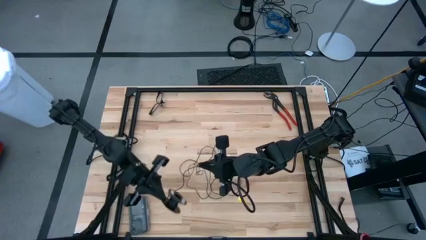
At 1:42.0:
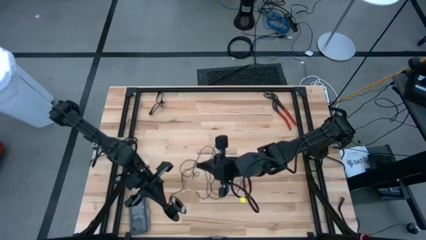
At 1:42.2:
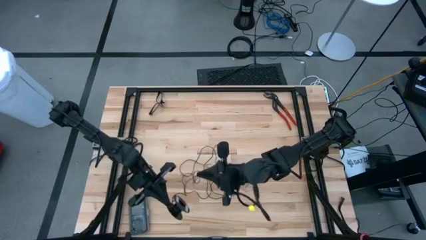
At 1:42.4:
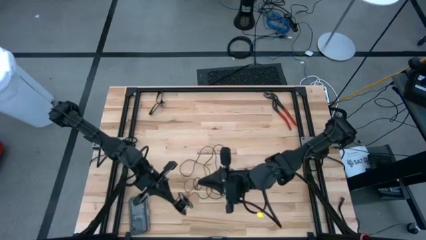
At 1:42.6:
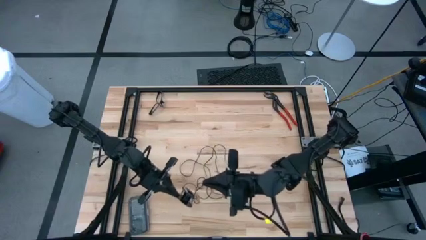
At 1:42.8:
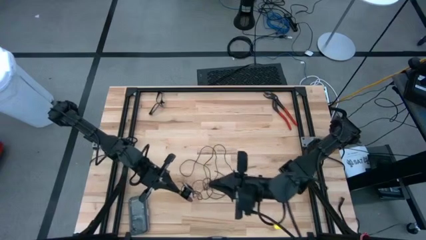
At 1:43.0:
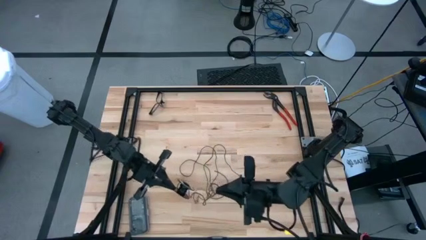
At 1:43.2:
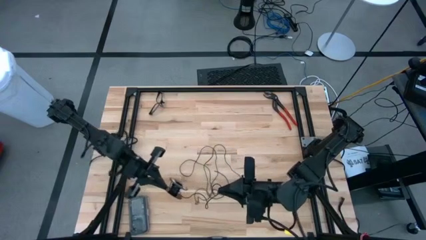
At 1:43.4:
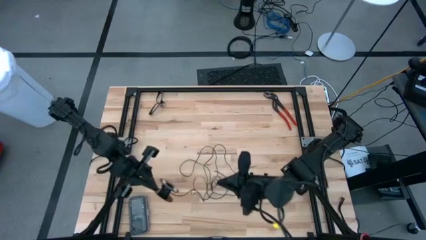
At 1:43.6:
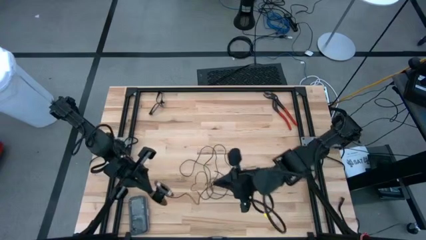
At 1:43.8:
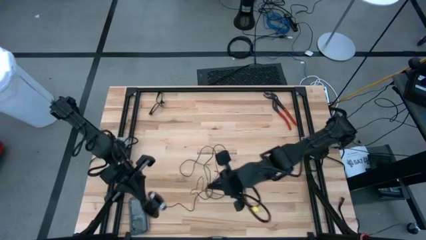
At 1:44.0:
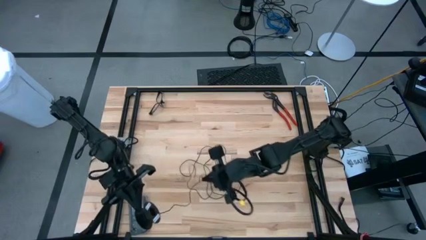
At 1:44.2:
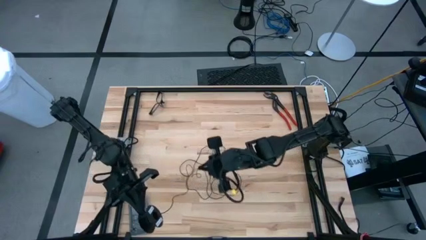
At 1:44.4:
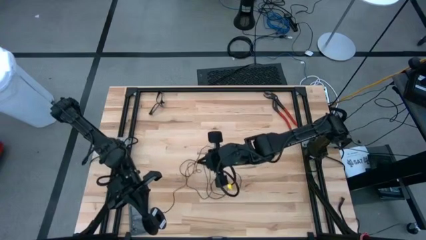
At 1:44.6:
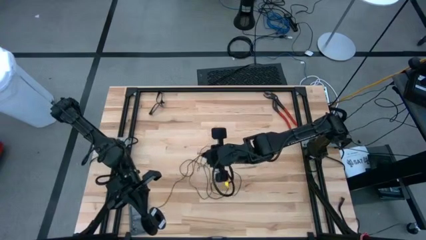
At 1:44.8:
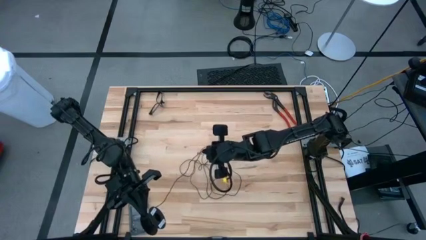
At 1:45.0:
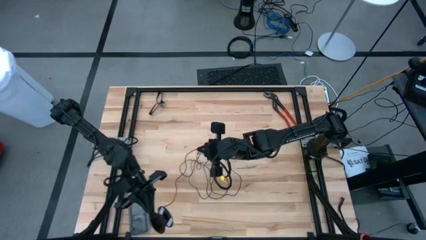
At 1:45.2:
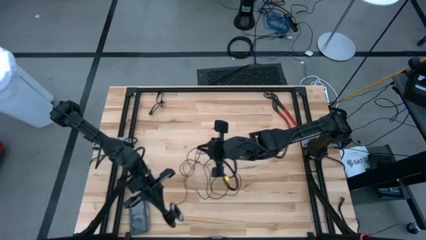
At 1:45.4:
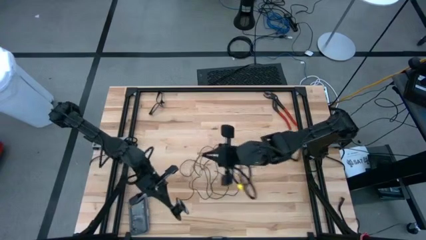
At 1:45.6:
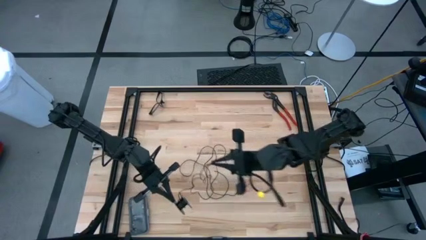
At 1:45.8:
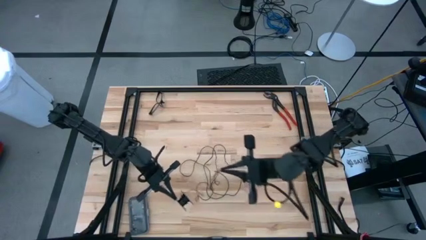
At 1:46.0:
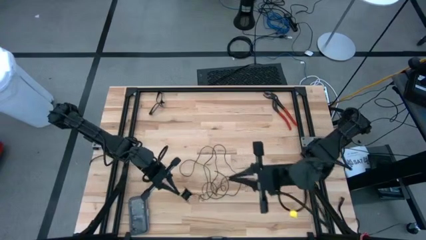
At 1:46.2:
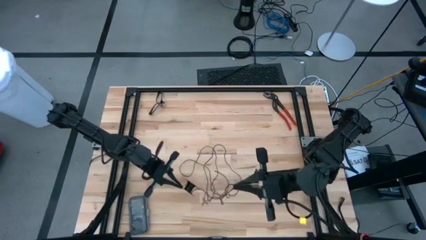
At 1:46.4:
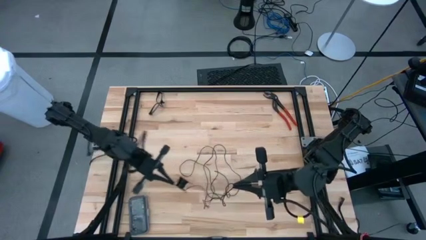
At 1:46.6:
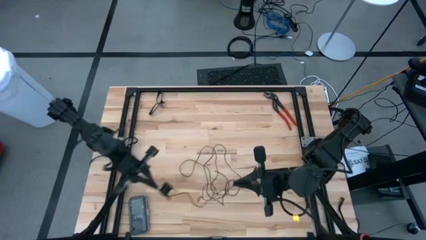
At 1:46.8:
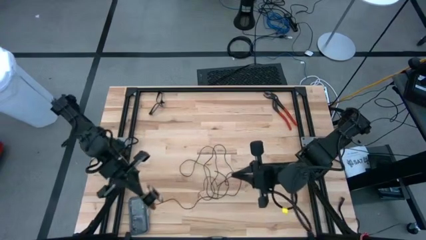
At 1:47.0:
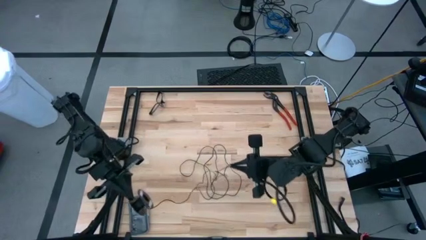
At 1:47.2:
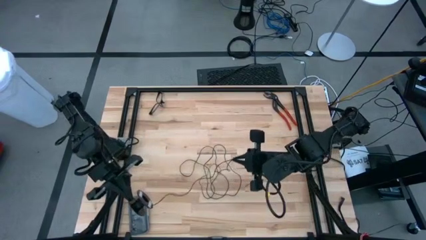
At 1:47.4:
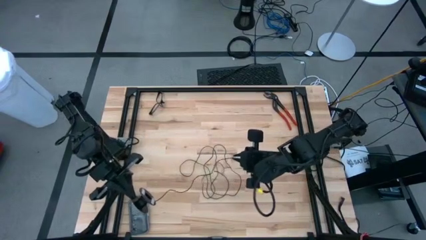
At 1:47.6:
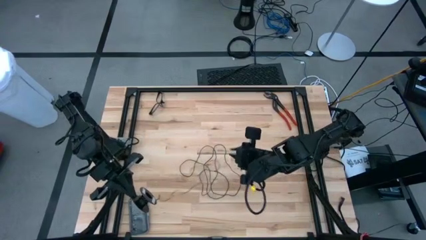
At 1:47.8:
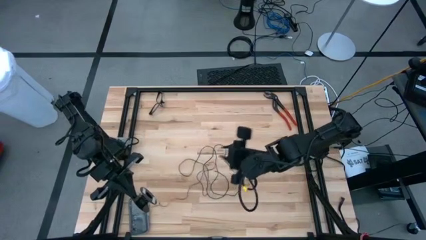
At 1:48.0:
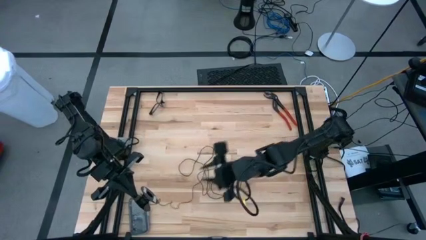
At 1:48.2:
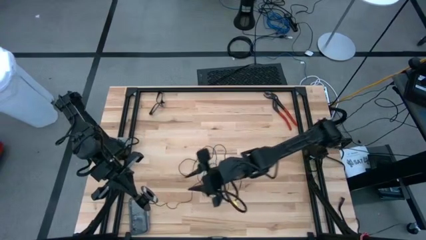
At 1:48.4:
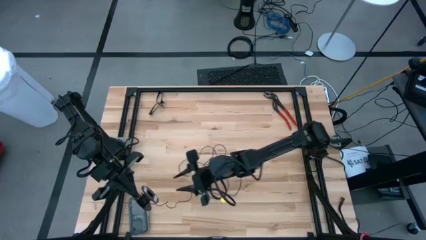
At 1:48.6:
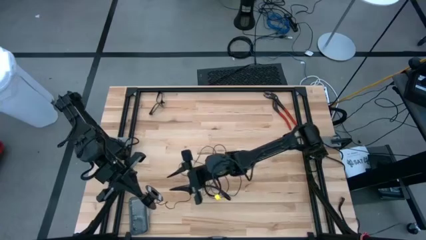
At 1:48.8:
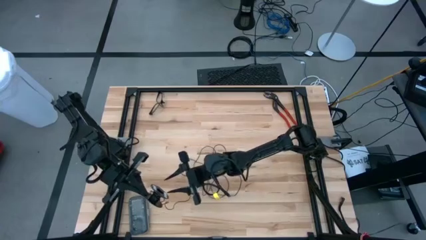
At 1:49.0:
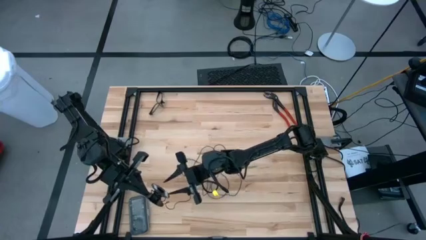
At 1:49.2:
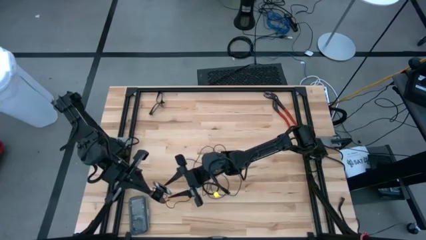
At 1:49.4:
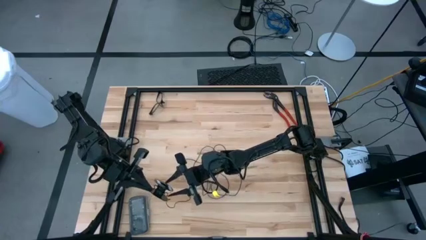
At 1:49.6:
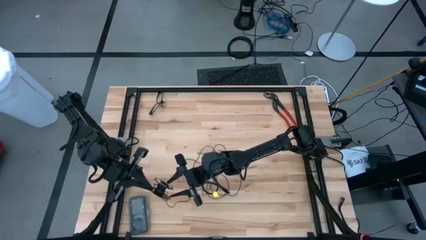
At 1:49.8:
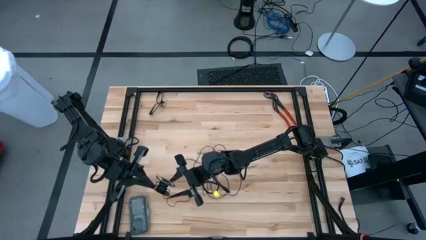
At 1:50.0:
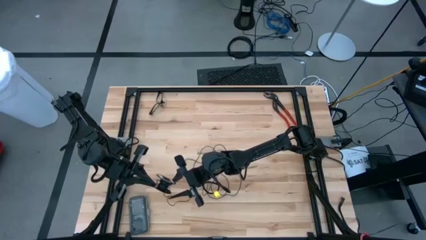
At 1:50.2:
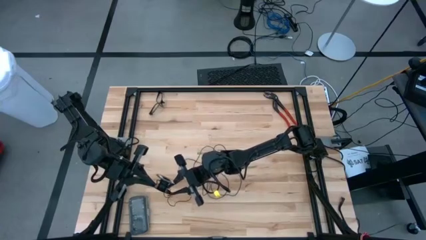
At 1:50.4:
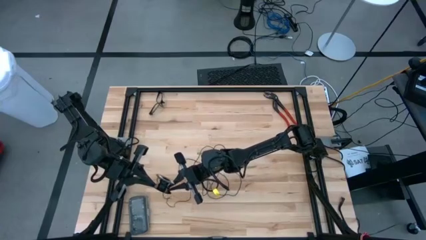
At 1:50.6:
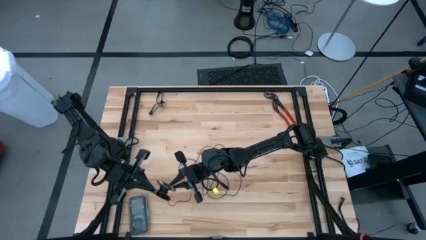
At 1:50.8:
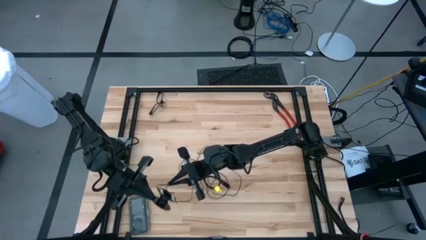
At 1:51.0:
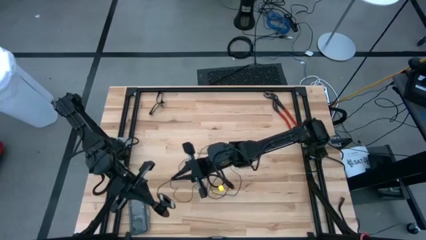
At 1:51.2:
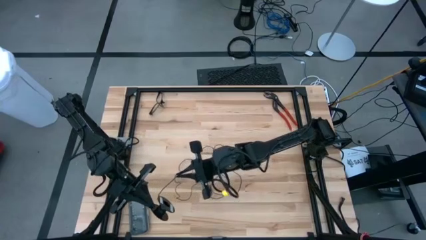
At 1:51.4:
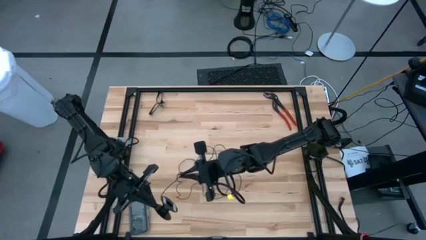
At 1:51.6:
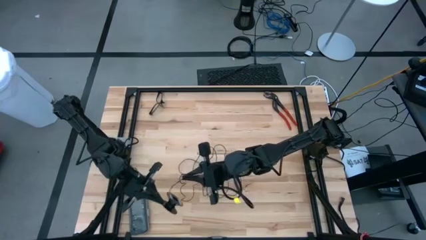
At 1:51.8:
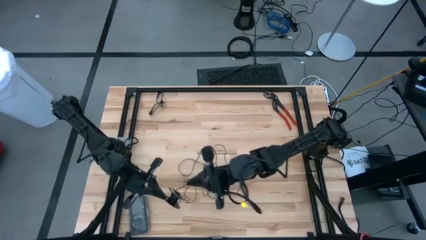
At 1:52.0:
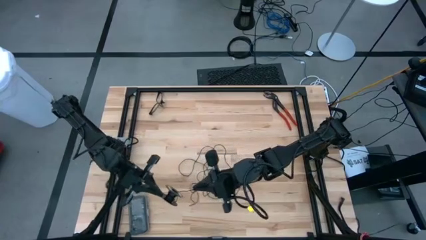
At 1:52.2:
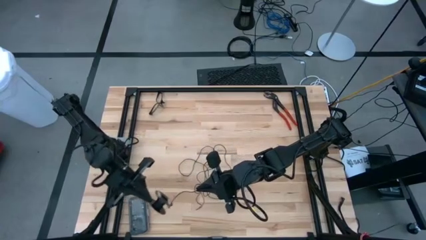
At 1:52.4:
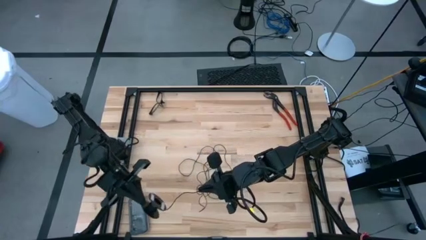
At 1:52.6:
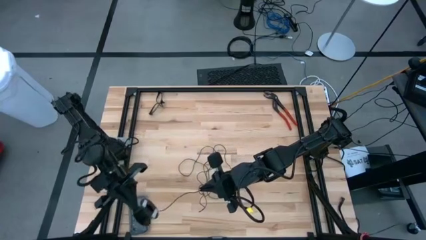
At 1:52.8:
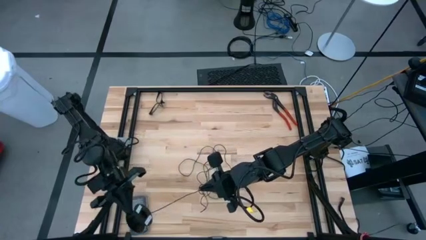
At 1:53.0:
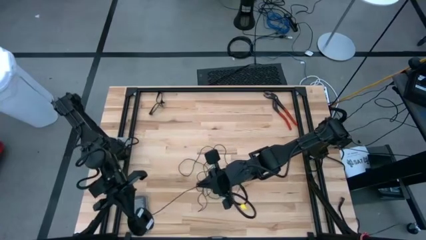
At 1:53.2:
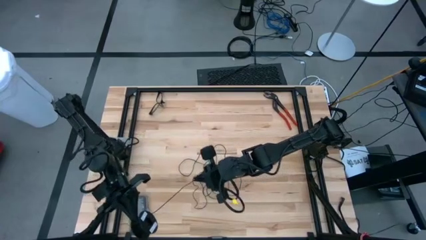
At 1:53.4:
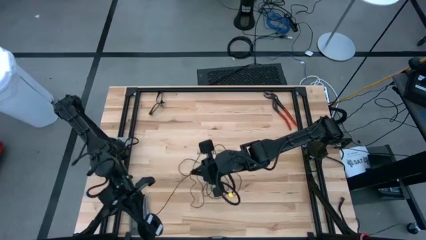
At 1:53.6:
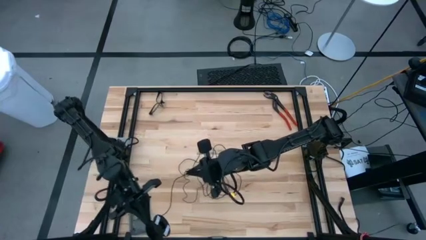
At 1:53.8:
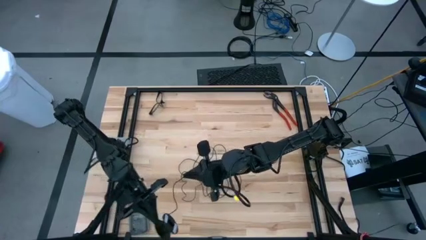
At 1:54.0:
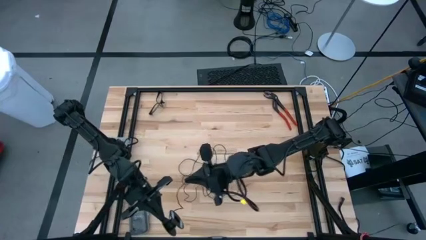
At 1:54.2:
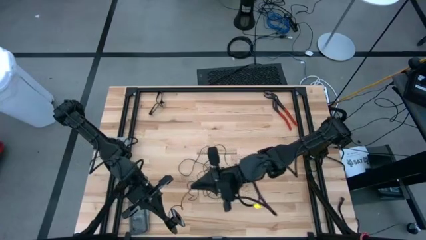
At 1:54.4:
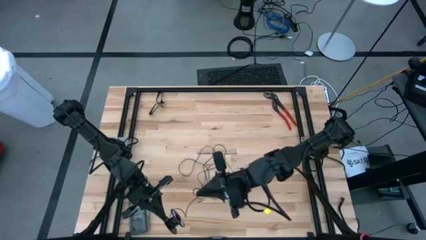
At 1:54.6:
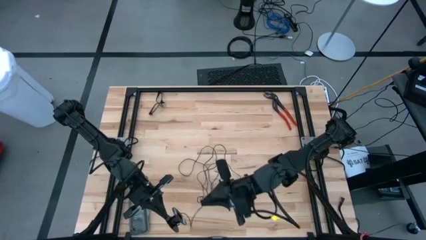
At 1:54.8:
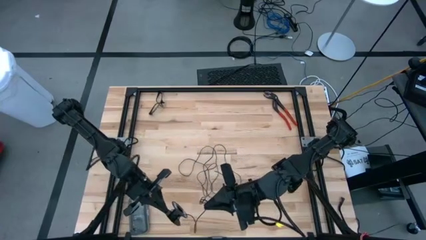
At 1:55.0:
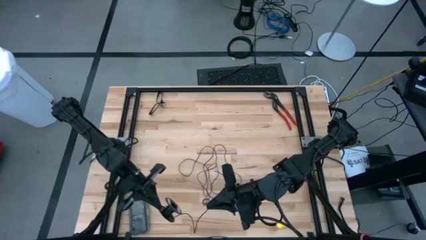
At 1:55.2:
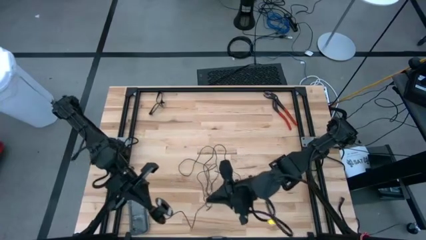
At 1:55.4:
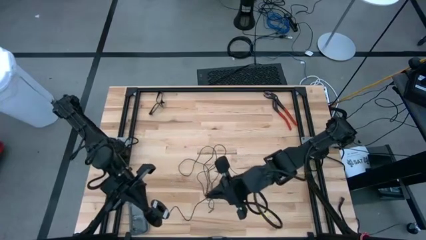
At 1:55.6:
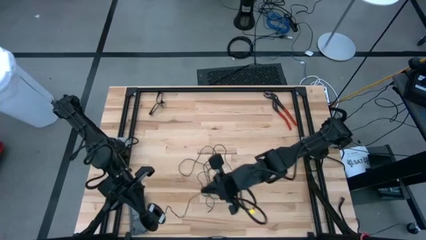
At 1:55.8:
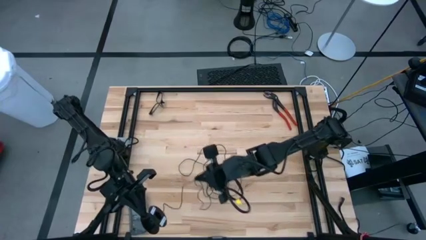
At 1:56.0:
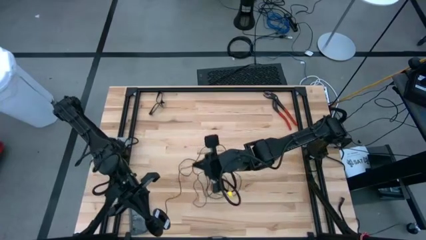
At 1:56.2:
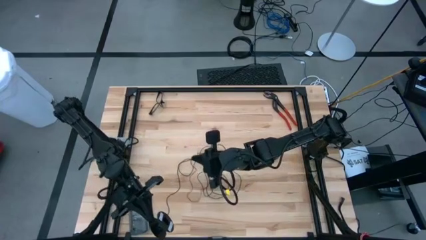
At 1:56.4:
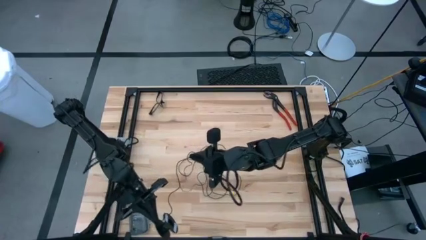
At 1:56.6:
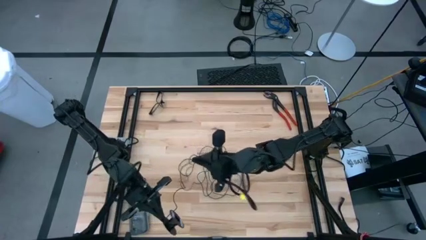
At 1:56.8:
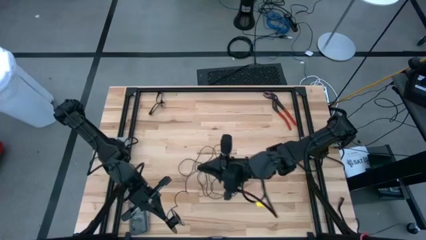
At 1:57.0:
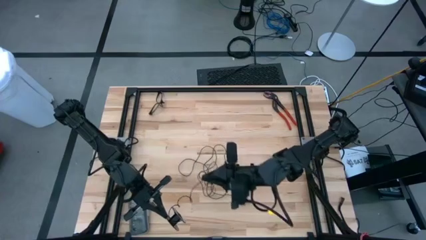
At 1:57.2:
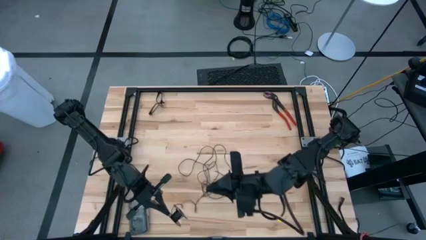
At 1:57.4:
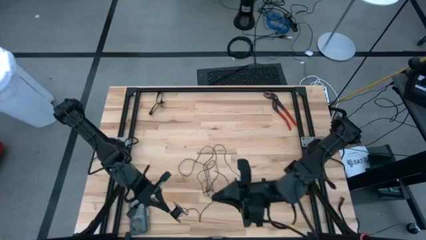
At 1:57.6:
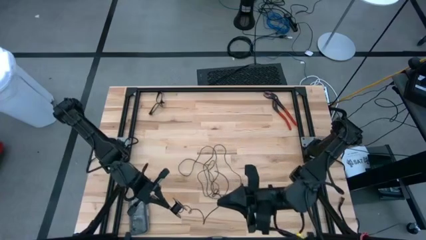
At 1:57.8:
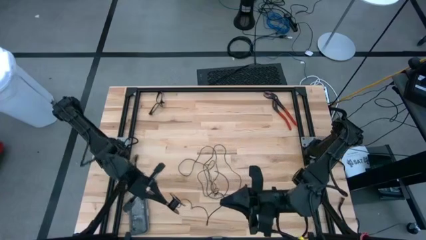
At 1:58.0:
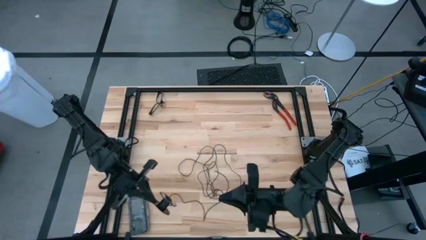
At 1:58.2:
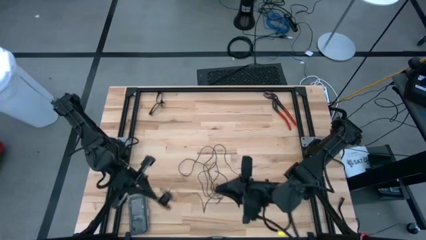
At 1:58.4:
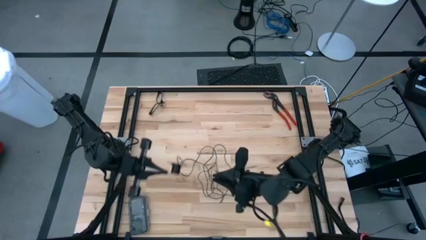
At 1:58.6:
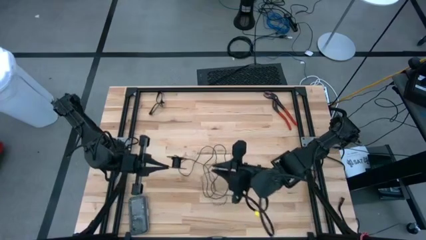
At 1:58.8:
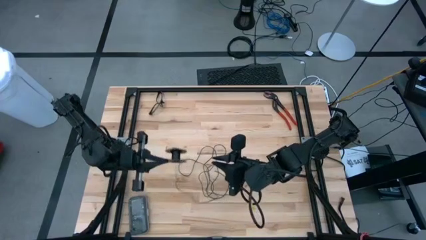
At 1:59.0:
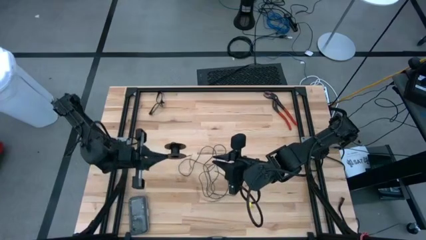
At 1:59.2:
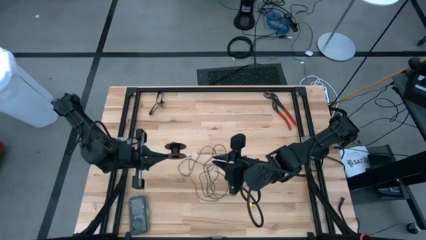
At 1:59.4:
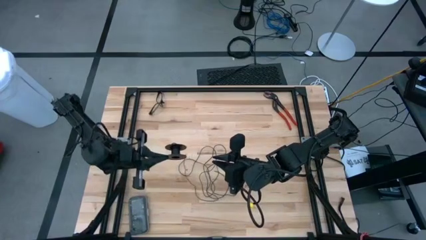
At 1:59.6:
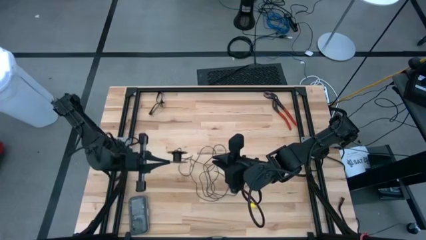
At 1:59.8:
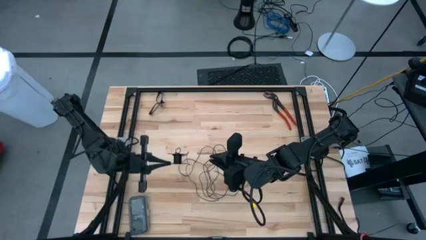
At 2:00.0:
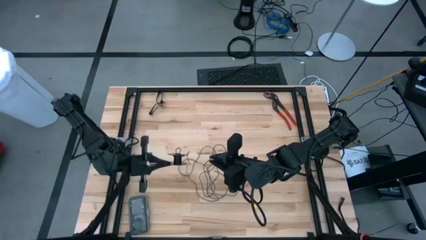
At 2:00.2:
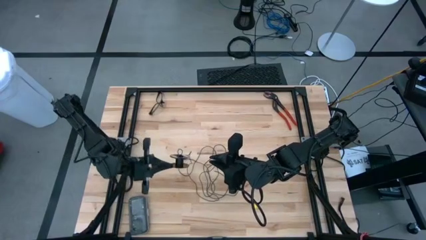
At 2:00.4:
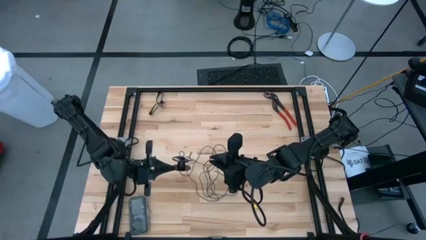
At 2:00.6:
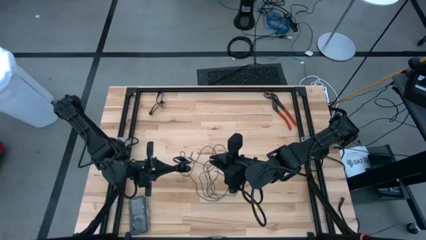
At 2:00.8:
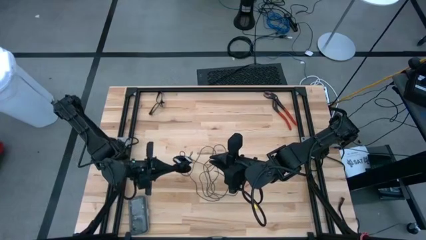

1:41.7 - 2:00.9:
Task: Coil cords
Uncoil the black cable wire from the spool
